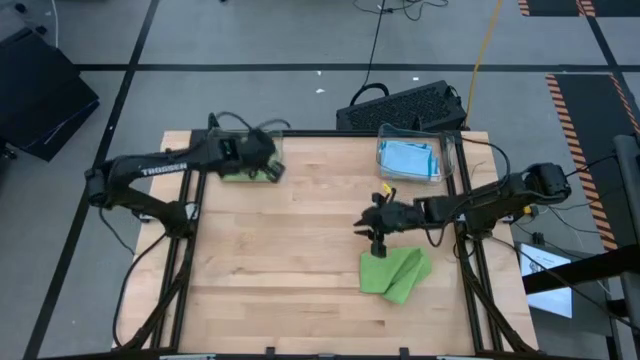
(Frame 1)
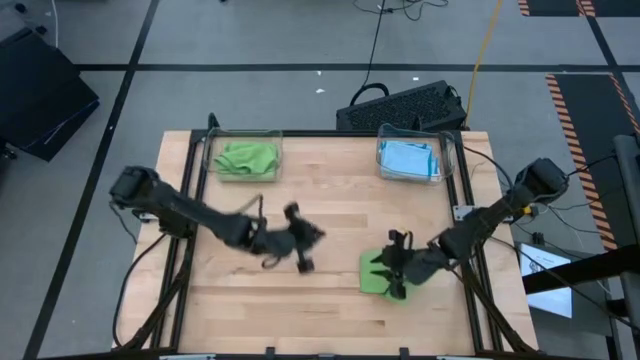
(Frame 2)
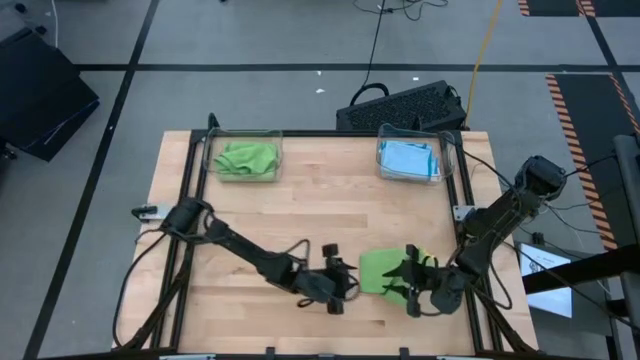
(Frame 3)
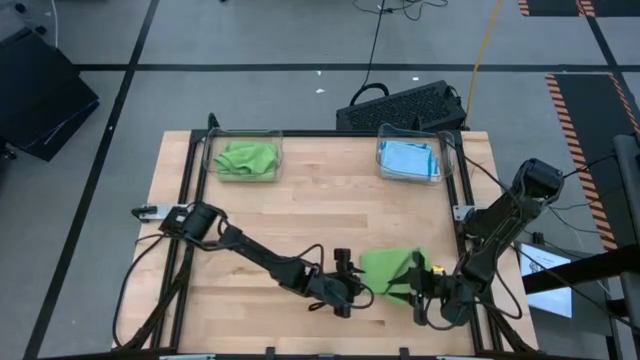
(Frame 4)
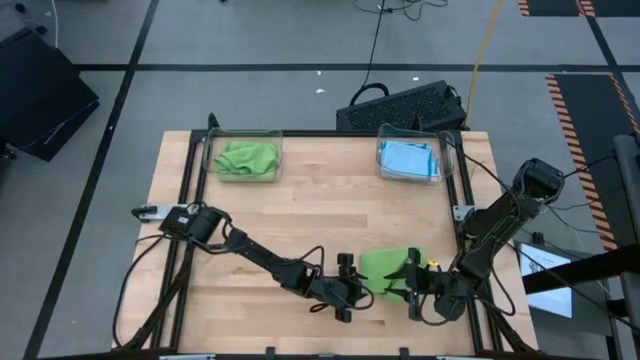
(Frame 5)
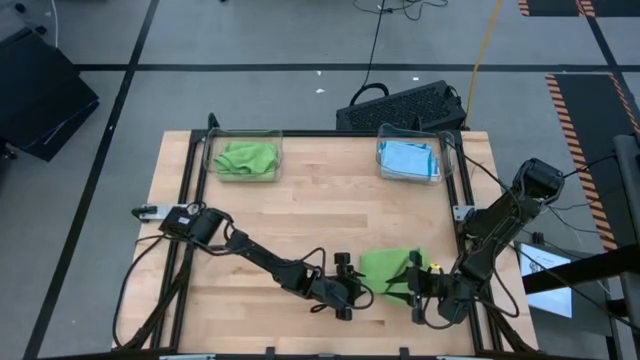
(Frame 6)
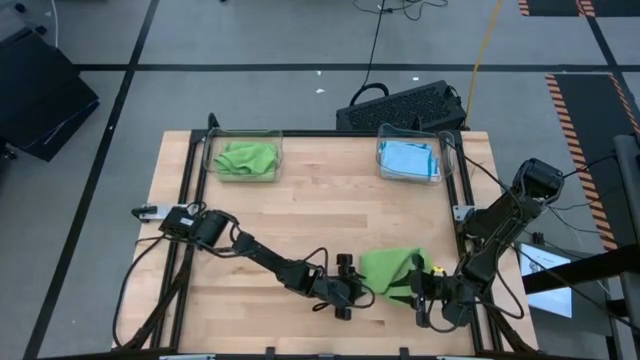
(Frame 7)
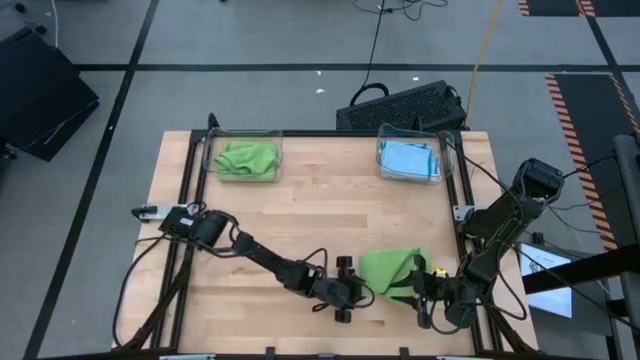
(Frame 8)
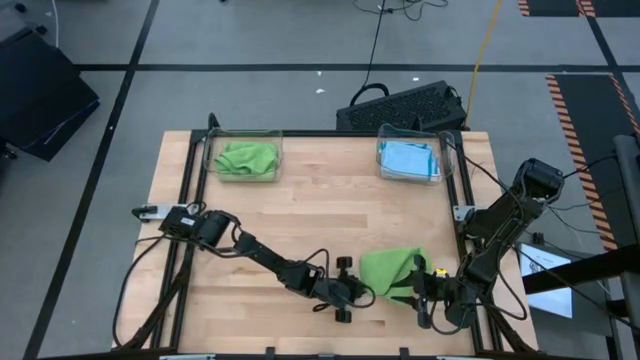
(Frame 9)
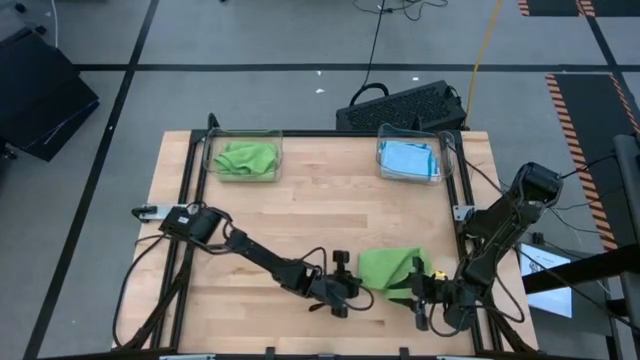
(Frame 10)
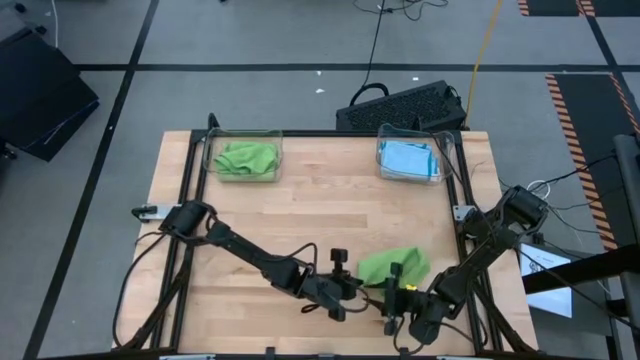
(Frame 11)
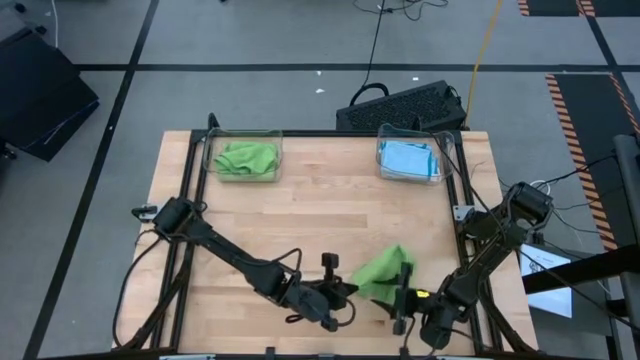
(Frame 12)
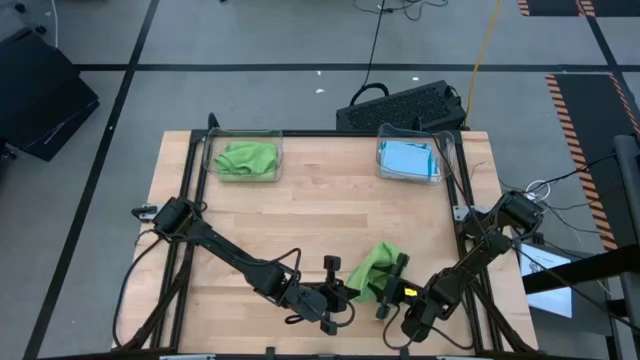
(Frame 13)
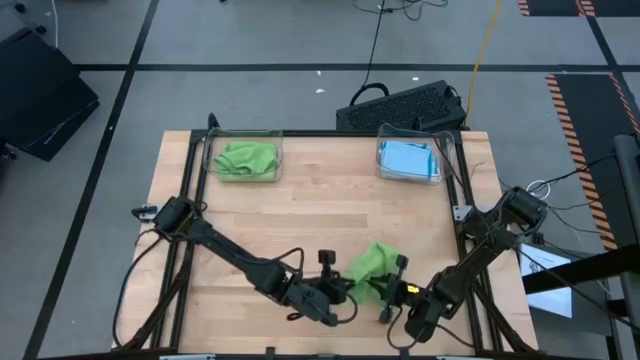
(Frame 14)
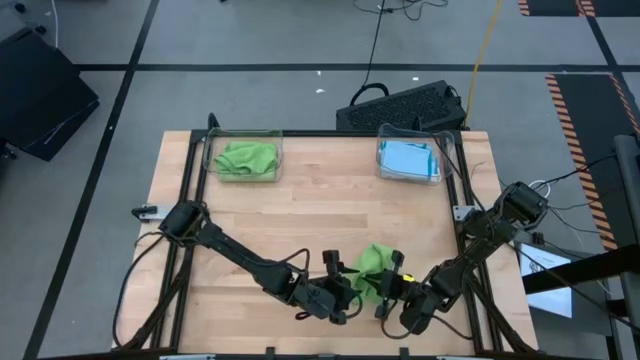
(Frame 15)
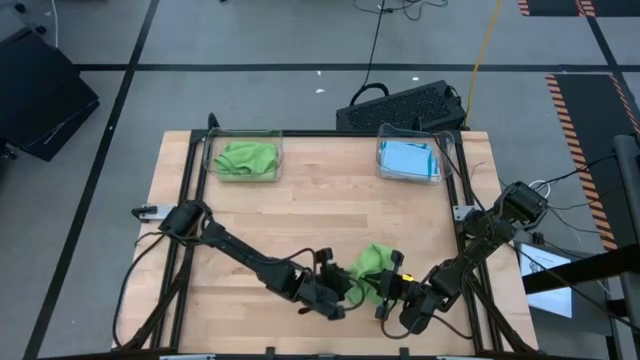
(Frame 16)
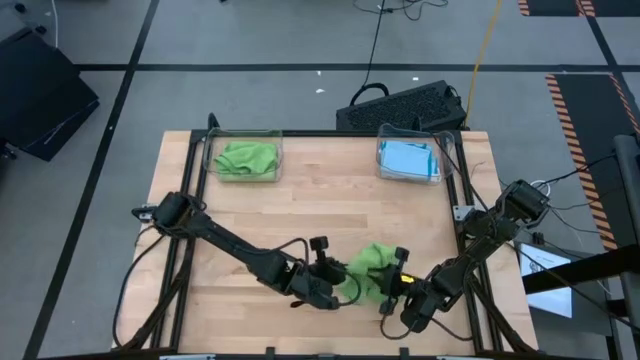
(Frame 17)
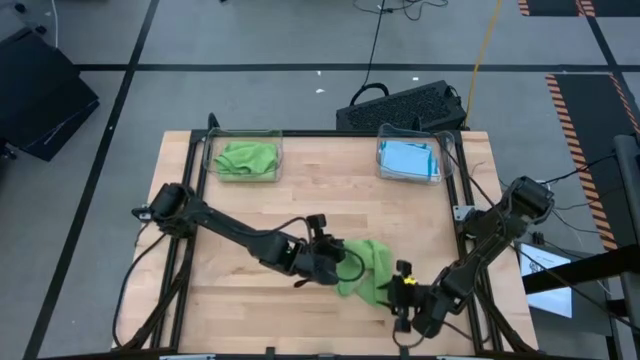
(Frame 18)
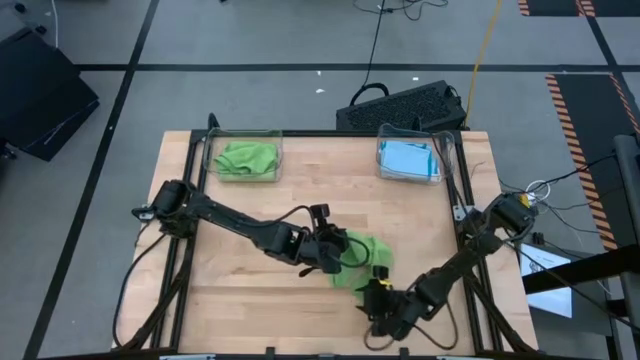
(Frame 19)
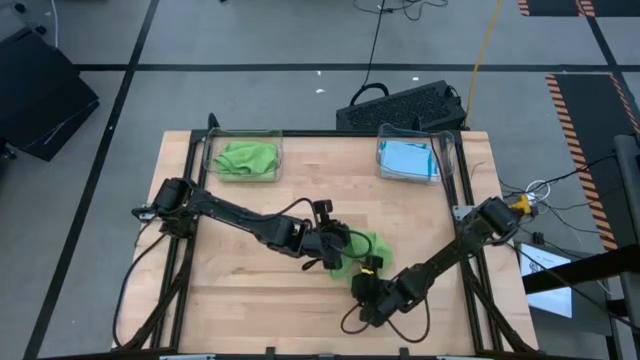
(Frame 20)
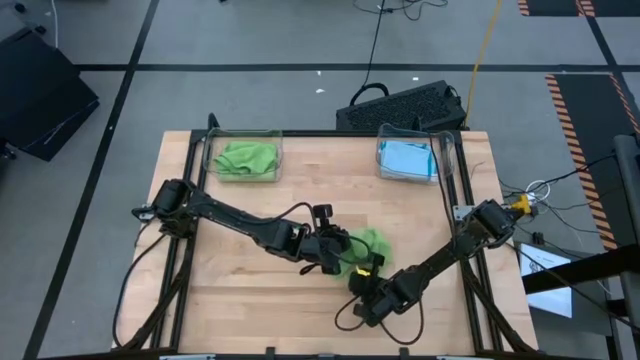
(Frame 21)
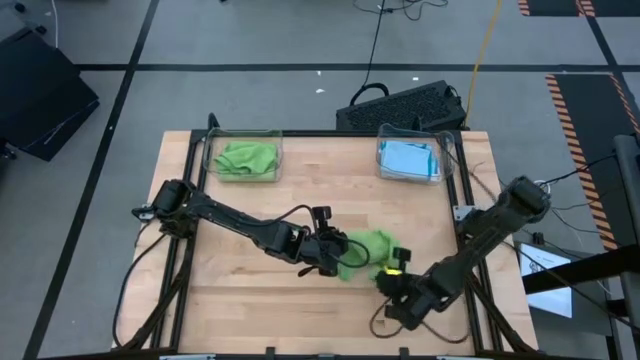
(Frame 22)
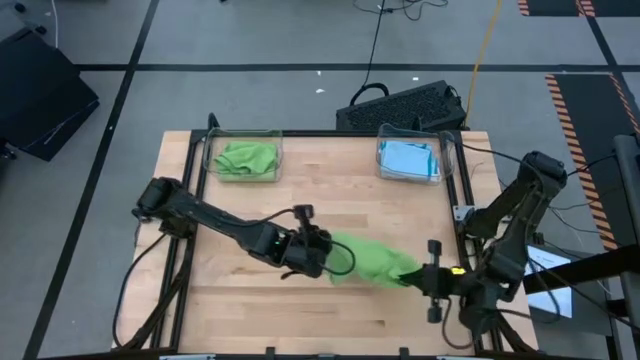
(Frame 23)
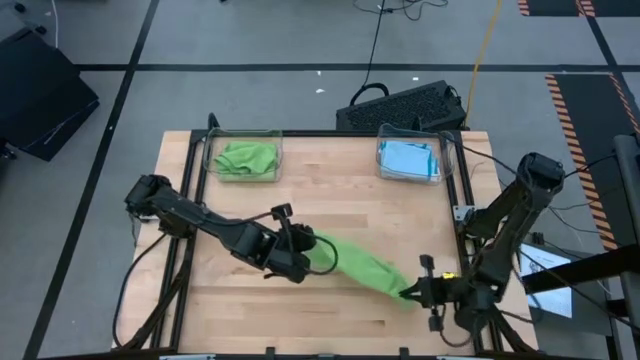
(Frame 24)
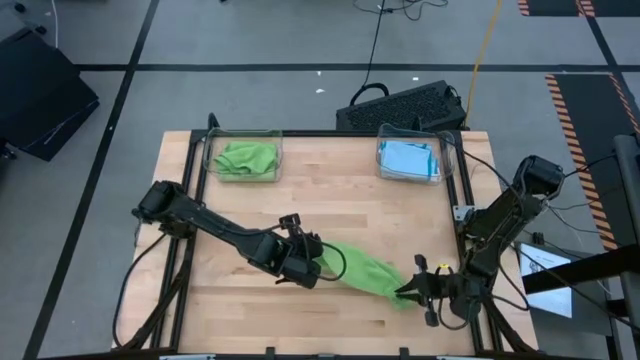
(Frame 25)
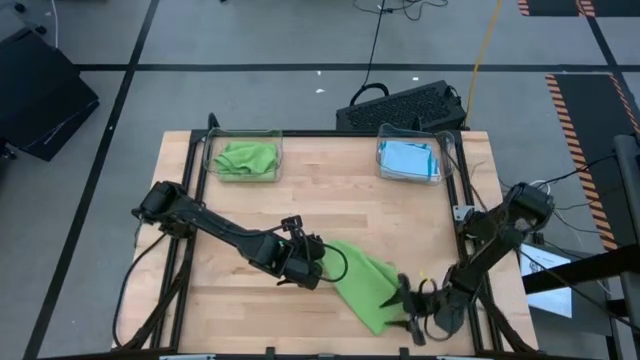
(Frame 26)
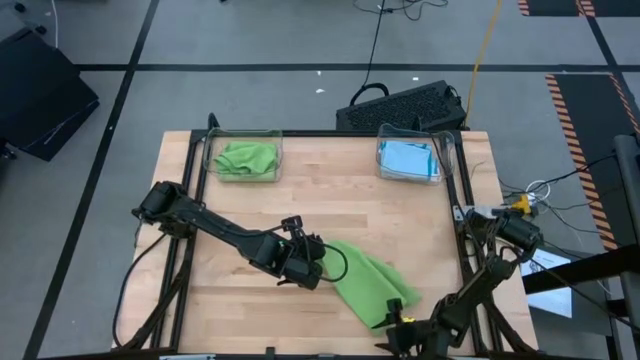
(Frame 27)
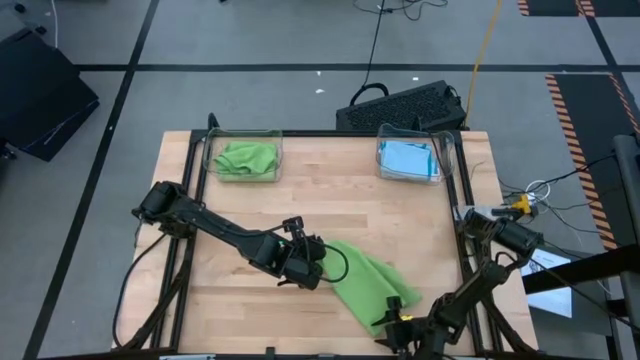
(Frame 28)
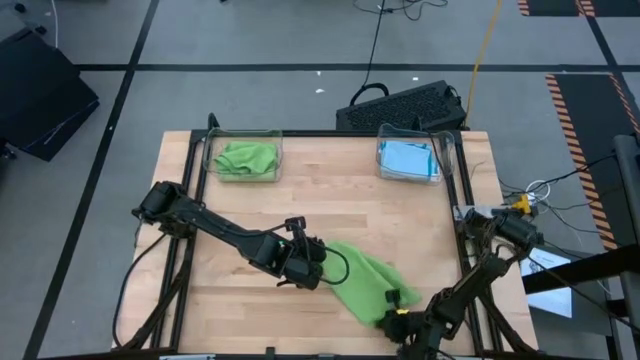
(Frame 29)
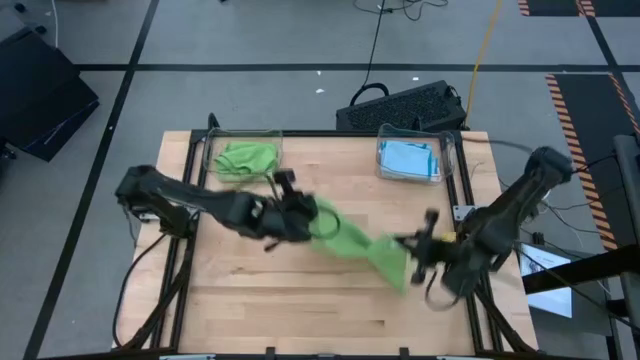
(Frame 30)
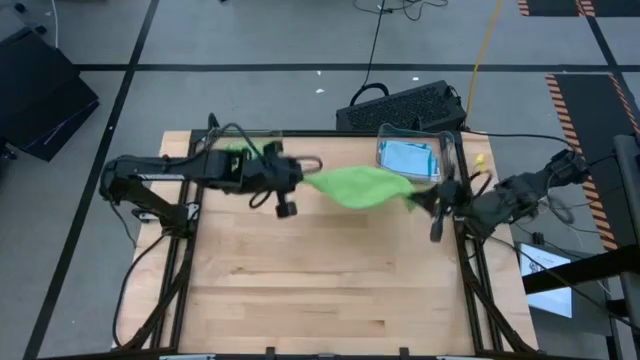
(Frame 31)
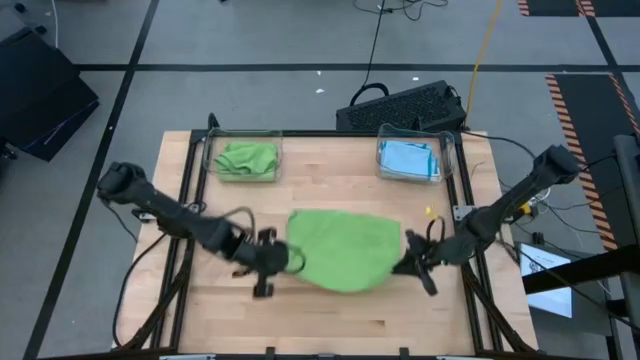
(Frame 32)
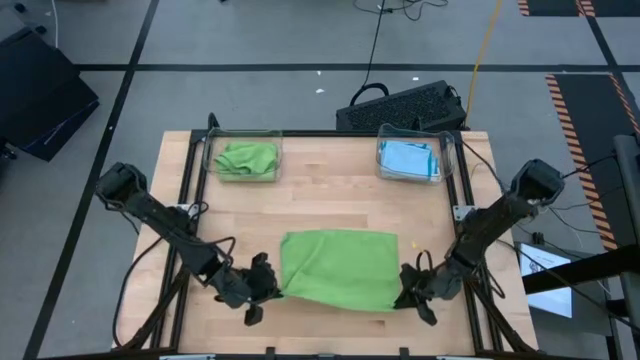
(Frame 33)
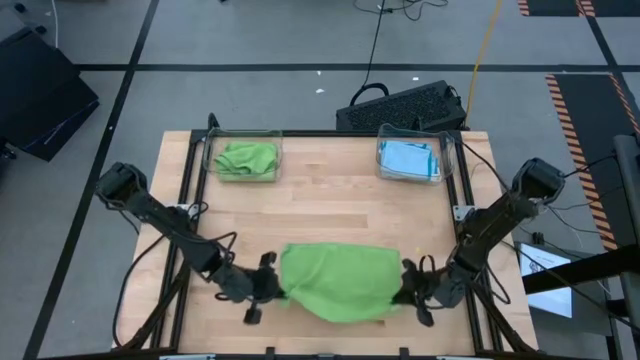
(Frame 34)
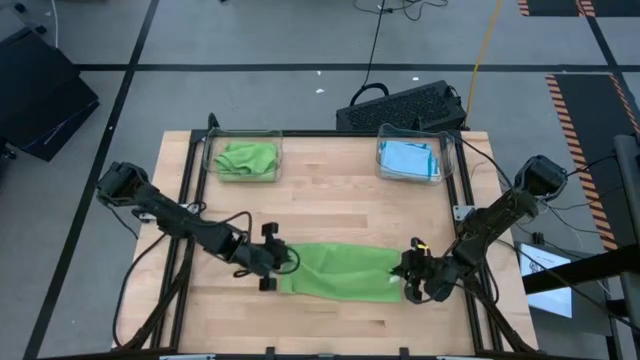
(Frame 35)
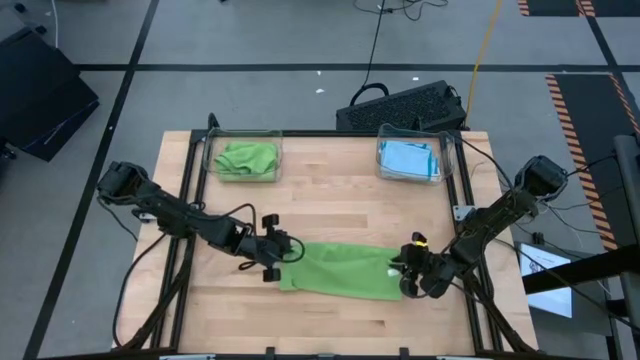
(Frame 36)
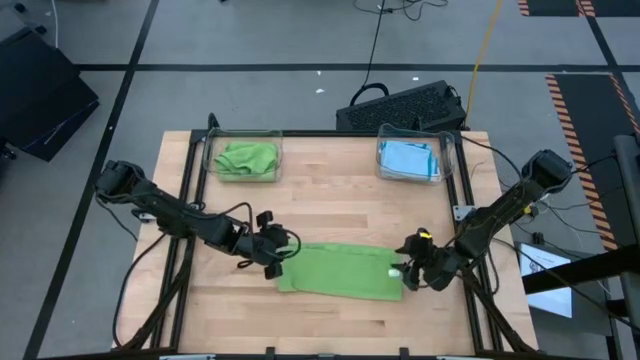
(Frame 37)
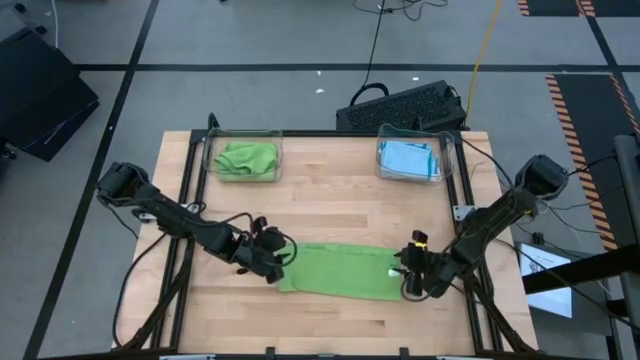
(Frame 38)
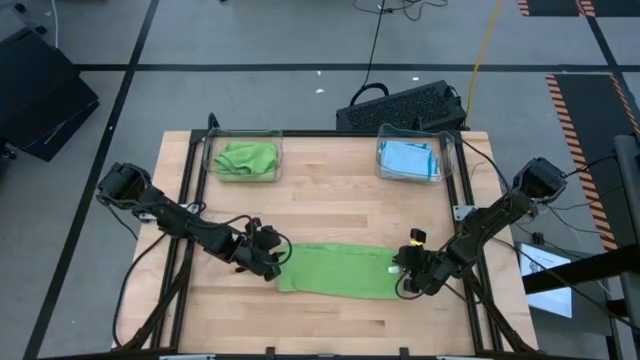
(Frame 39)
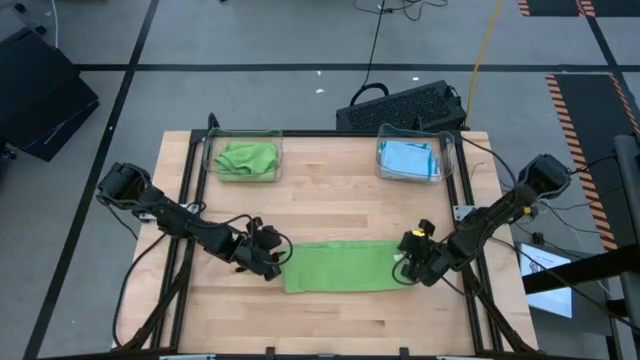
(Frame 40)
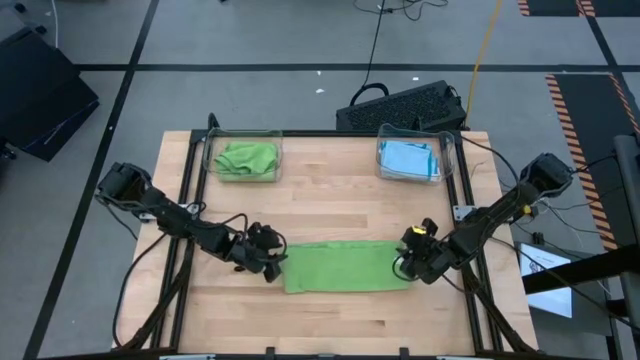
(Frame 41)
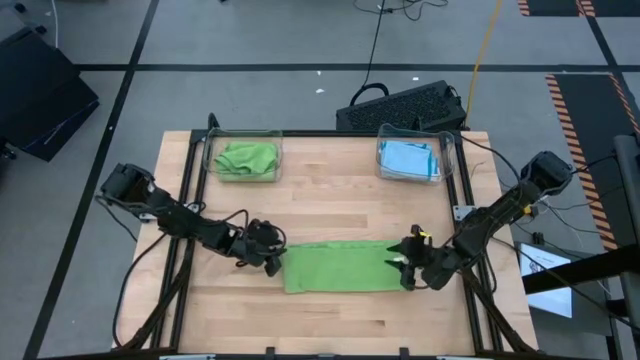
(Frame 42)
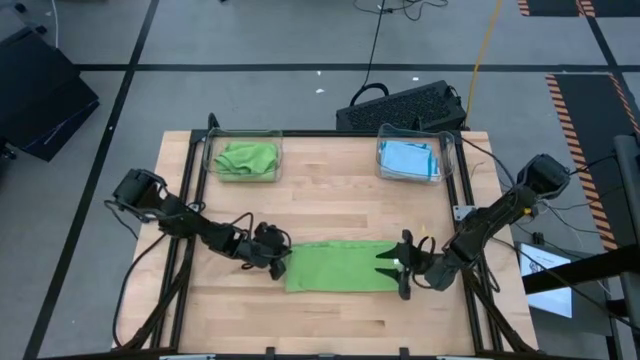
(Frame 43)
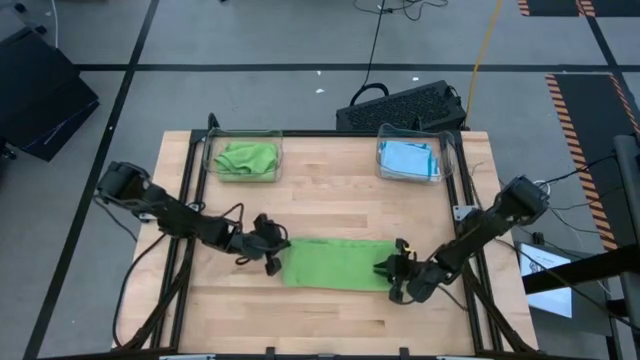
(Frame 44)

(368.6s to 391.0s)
Task: Fold microfiber towels
Fold the green microfiber cloth
